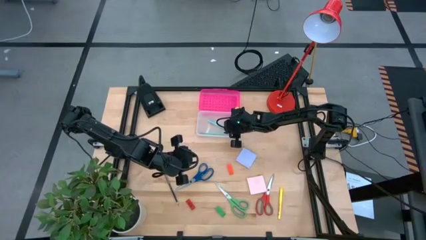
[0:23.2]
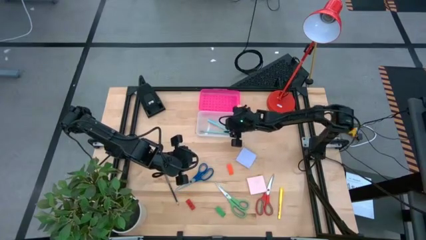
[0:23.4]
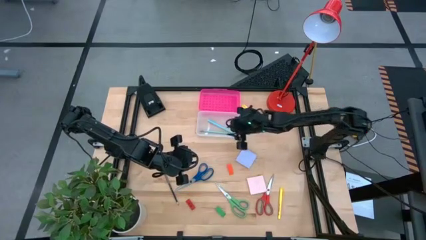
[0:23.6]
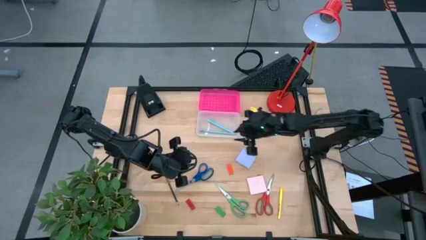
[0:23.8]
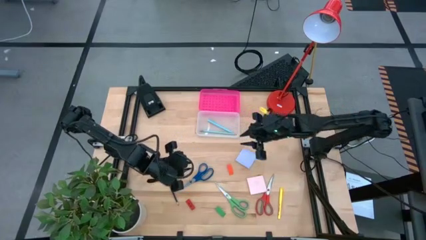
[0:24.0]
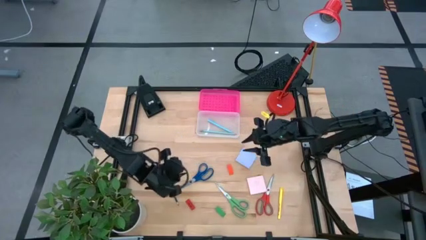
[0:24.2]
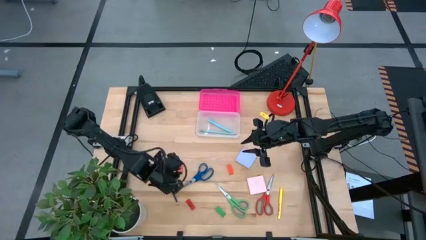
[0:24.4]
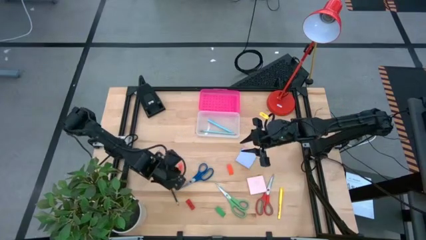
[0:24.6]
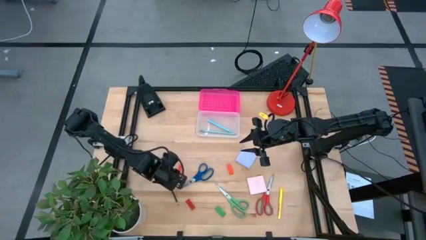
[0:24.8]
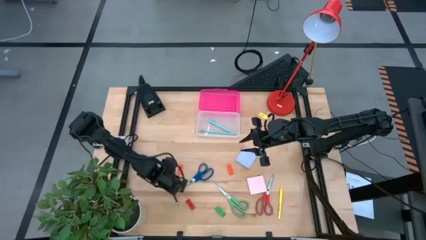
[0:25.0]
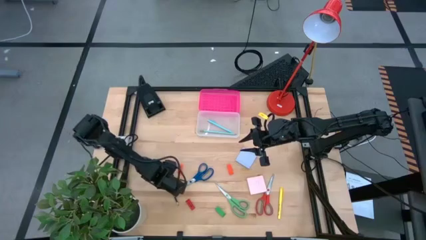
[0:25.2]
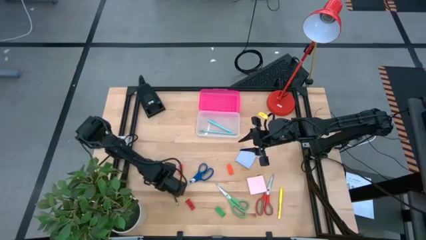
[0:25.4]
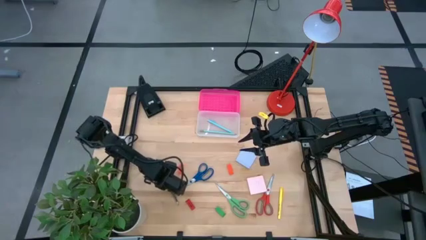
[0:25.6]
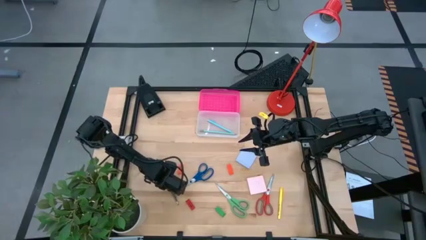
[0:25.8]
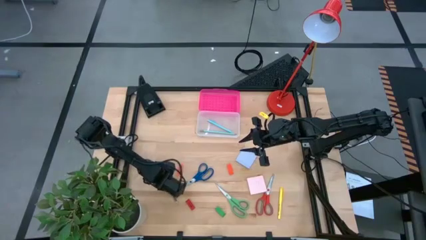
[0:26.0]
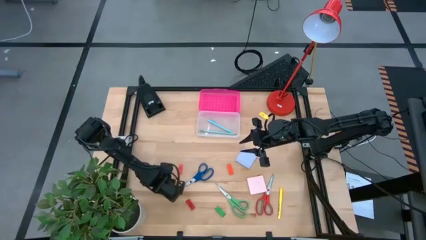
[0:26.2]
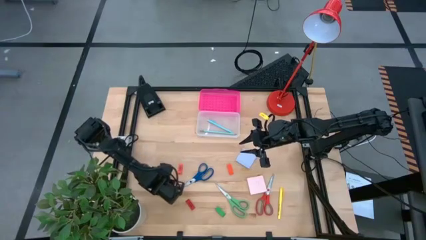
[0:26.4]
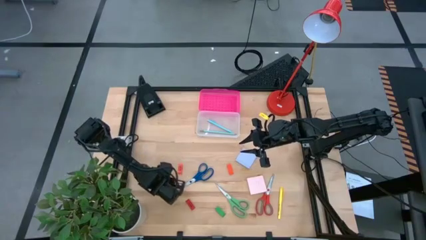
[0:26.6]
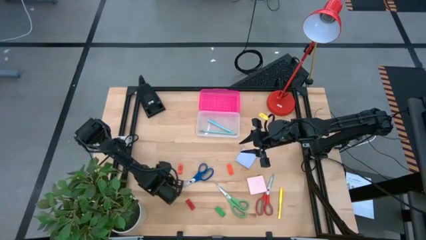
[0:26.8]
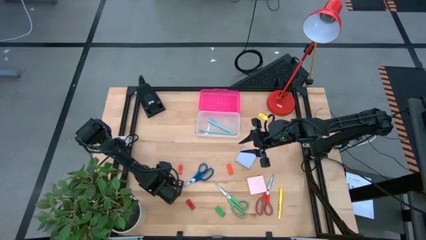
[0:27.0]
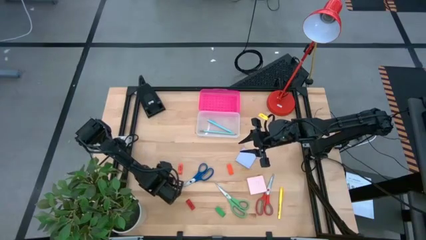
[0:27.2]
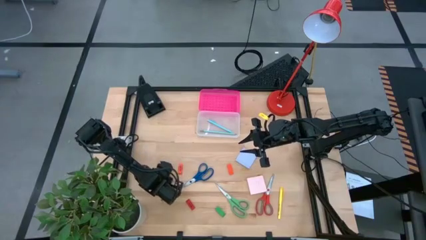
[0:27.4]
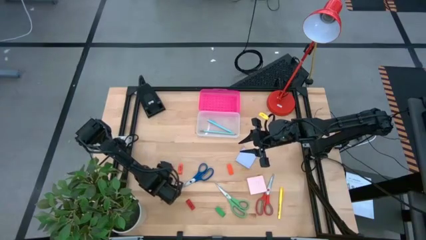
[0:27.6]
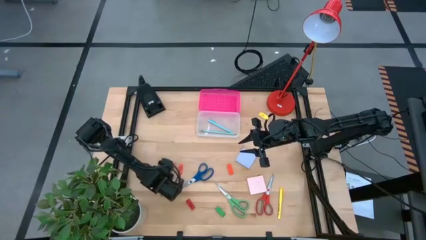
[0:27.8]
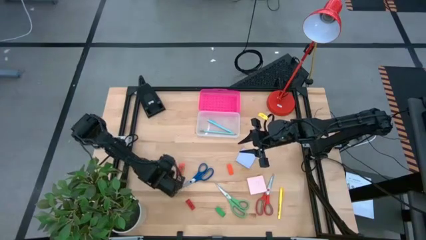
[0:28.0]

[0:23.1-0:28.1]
Task: Pack school essentials
Put the black pencil into the supply box

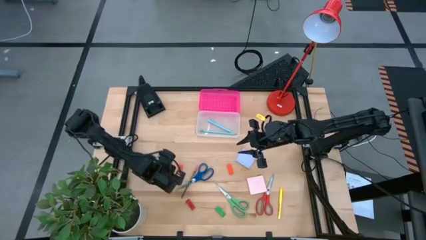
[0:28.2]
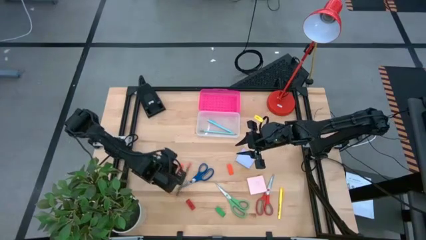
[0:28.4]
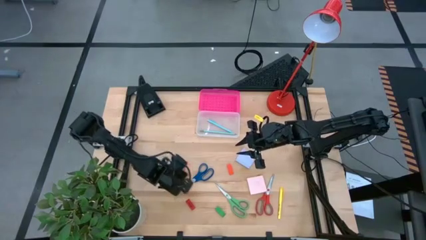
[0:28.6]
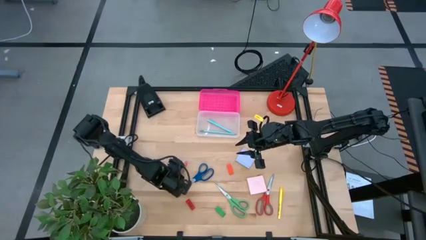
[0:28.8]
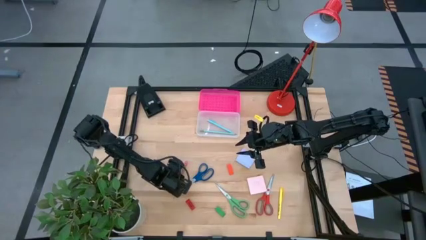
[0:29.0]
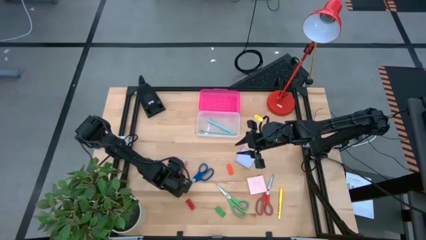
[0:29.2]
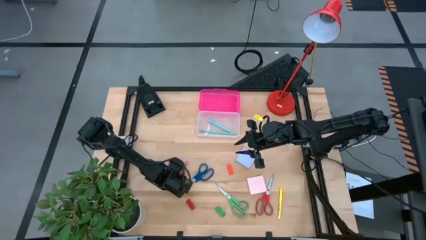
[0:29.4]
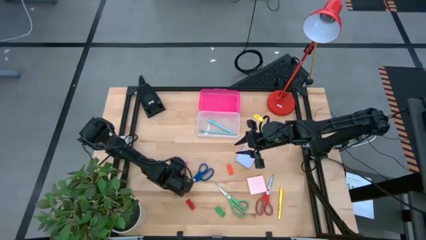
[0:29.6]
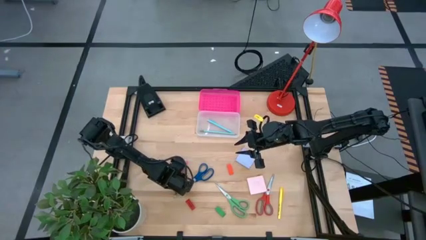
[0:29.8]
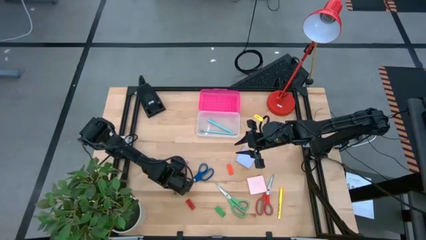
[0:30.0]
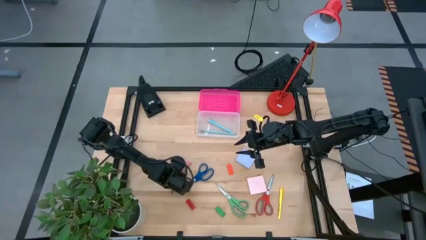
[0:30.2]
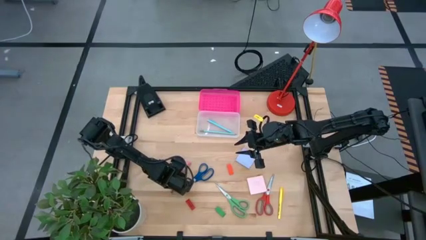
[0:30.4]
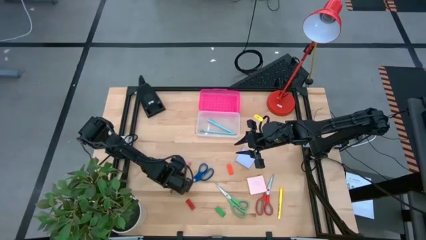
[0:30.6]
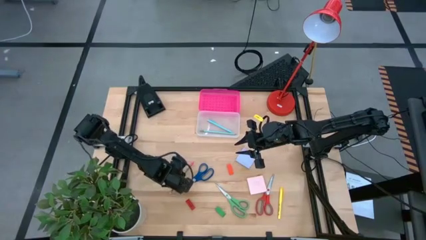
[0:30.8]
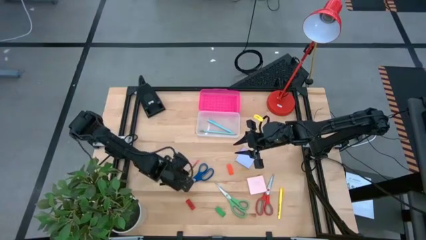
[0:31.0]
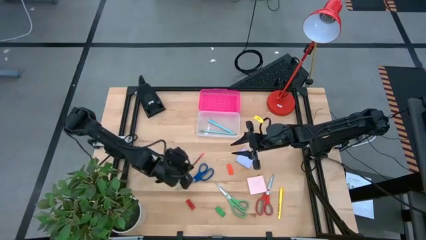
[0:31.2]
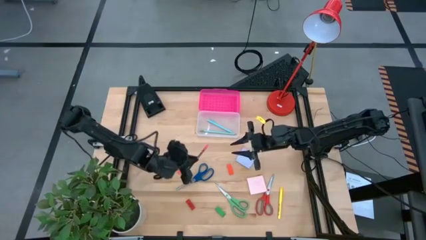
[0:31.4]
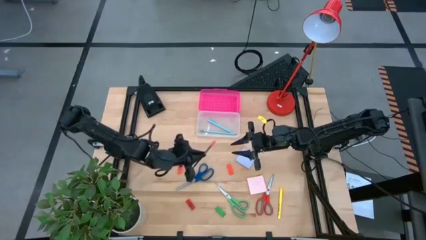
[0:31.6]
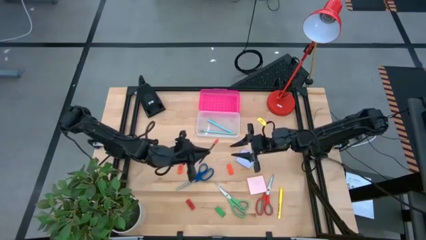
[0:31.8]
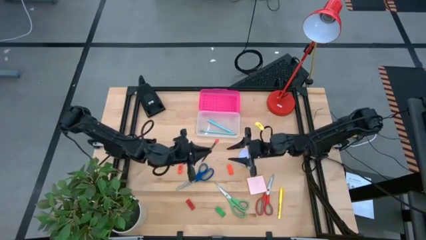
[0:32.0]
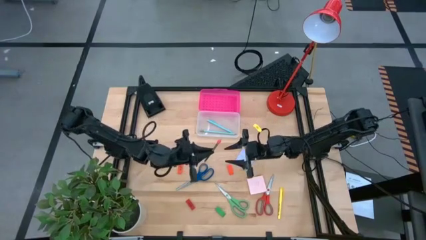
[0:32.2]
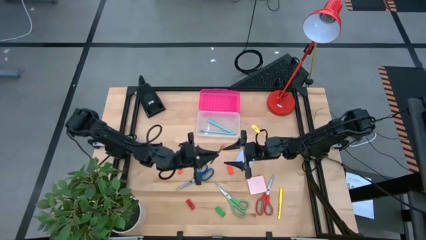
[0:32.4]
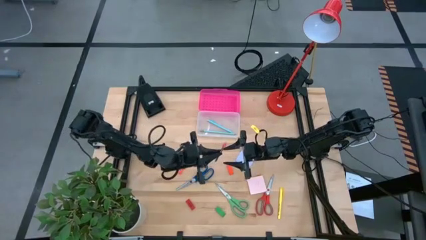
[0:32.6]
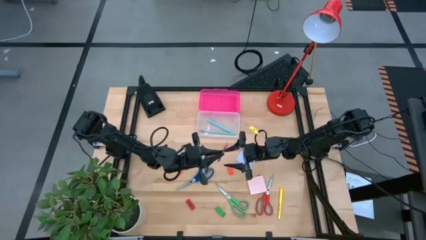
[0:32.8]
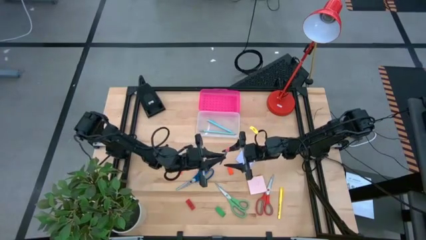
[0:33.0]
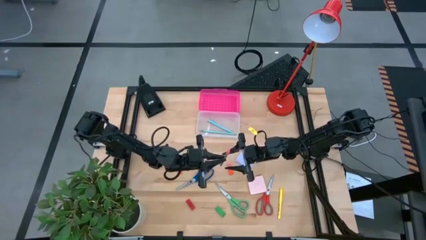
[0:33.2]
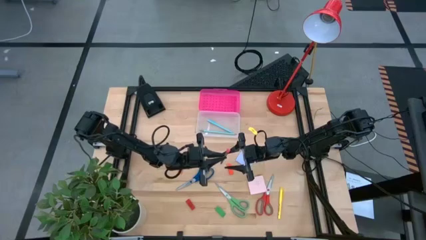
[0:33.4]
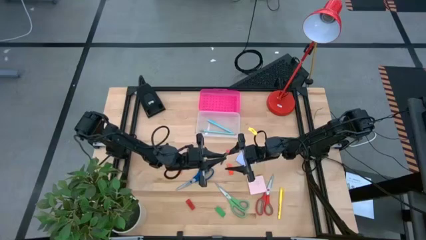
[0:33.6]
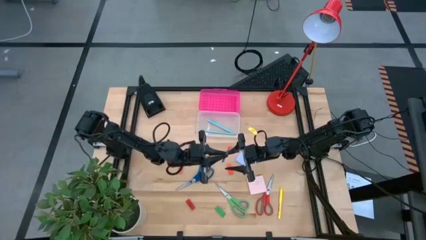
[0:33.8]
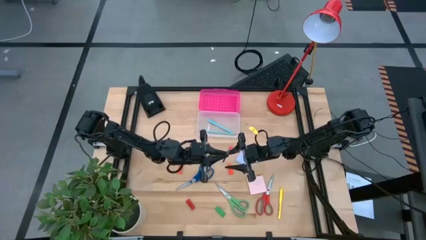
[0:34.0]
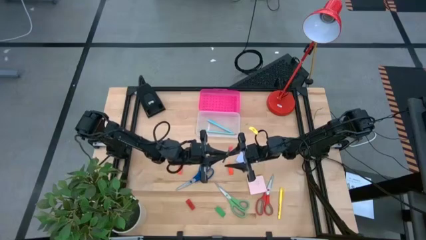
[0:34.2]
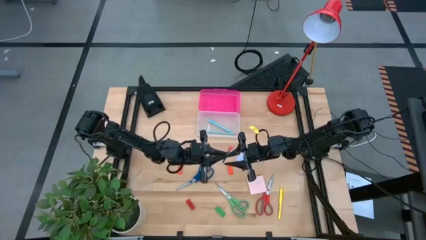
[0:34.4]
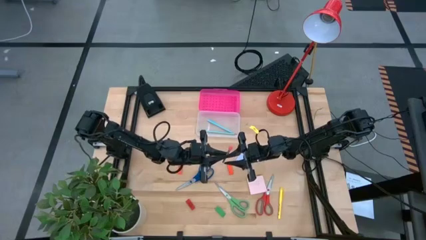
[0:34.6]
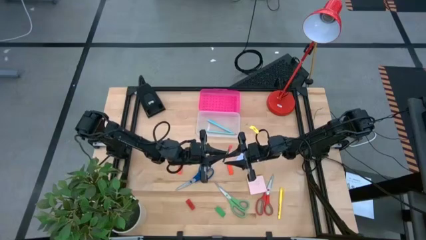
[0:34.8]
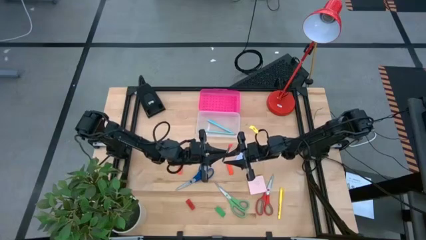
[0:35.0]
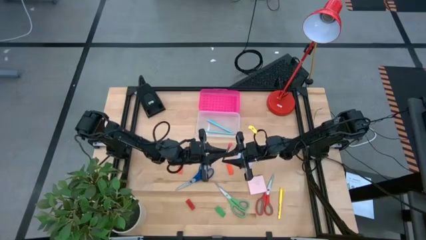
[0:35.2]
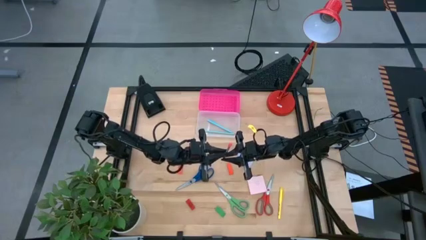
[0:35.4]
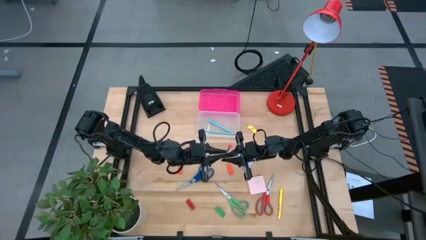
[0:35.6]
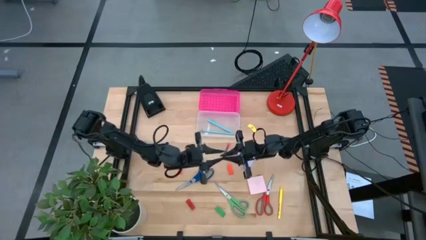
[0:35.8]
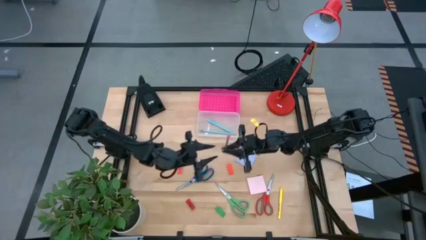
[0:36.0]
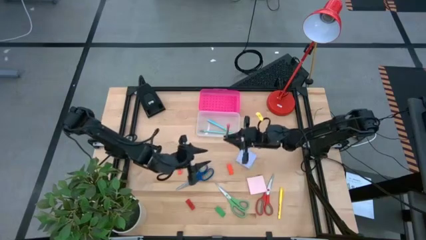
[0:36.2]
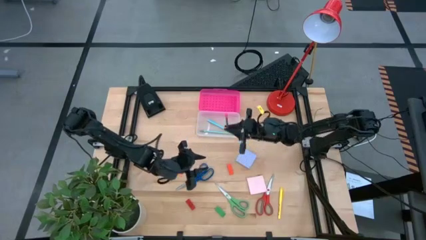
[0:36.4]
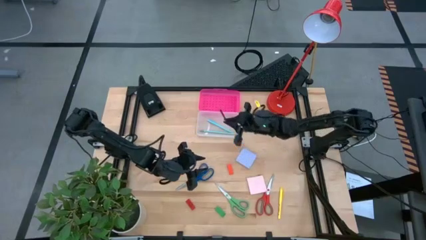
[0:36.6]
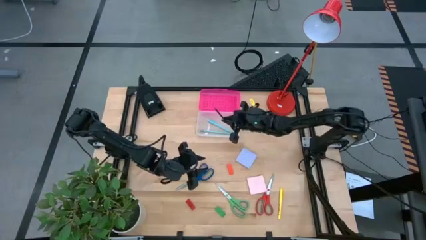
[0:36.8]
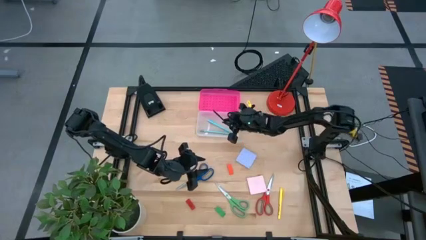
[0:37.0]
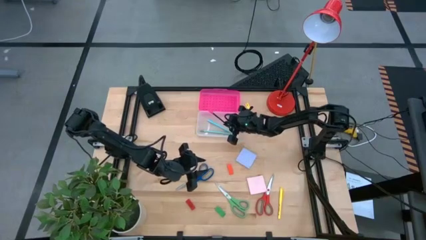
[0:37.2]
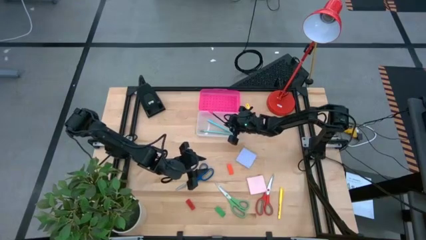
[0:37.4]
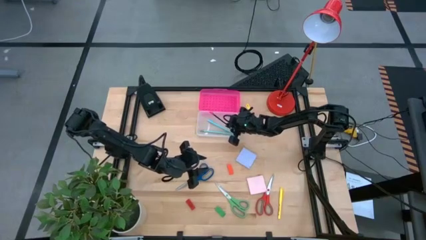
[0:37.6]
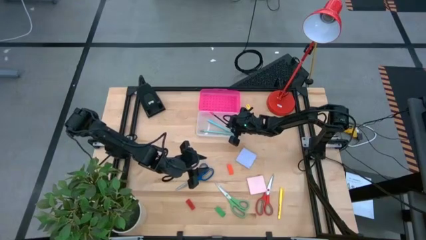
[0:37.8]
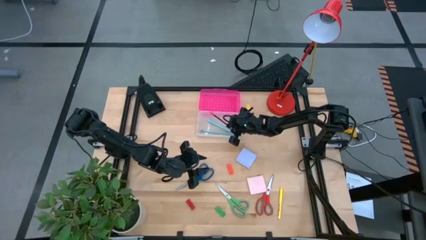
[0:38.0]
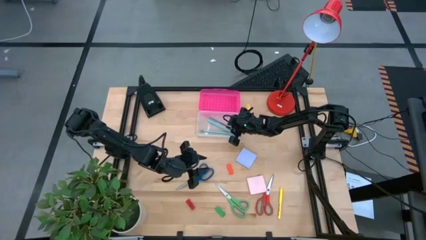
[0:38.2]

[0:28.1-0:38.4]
Put the black pencil into the supply box

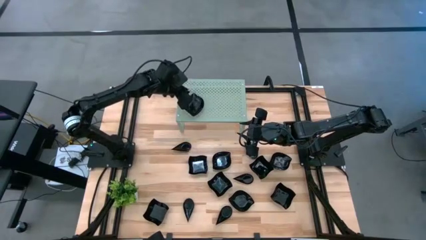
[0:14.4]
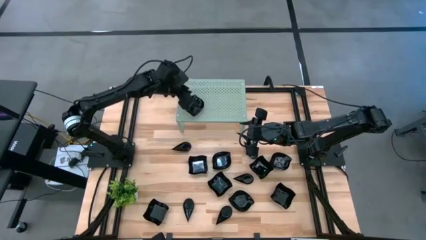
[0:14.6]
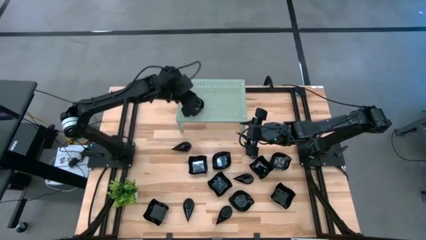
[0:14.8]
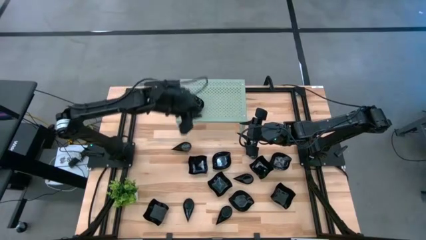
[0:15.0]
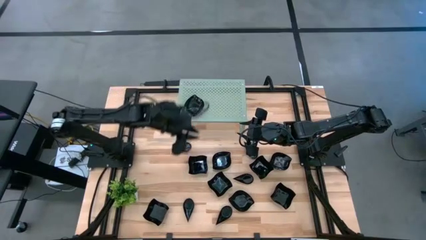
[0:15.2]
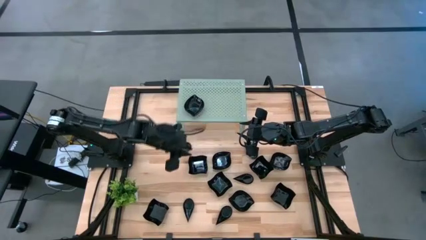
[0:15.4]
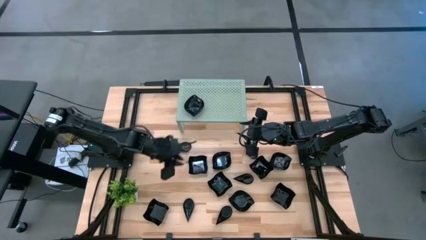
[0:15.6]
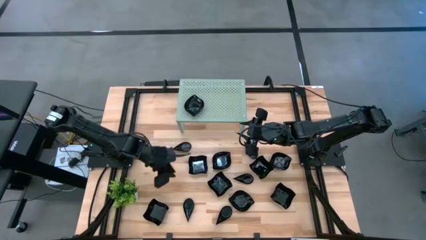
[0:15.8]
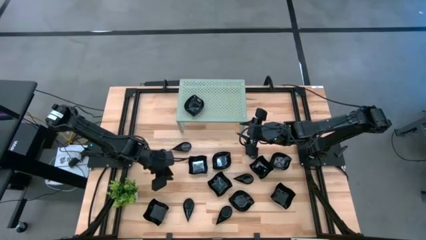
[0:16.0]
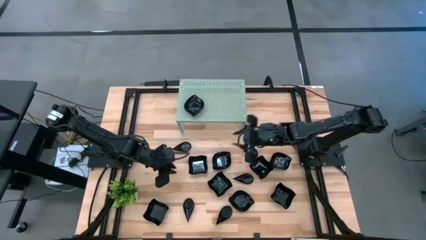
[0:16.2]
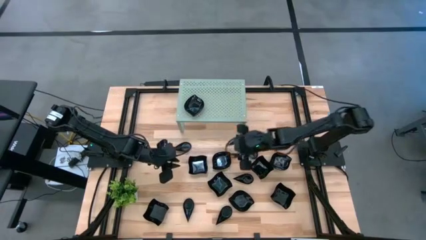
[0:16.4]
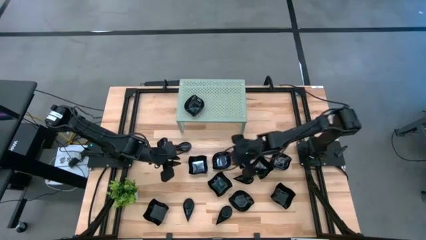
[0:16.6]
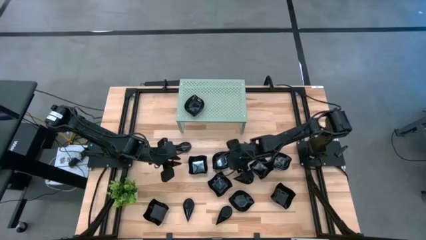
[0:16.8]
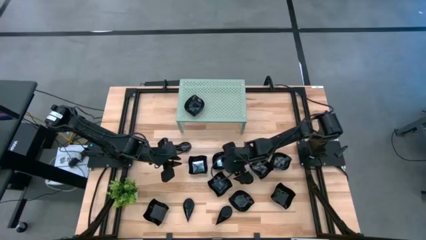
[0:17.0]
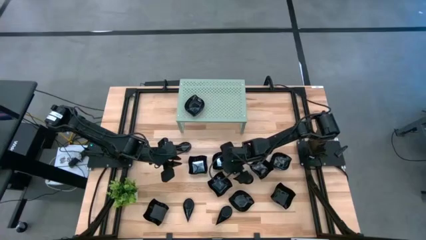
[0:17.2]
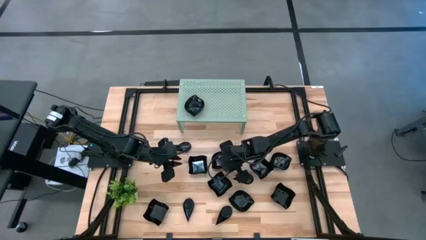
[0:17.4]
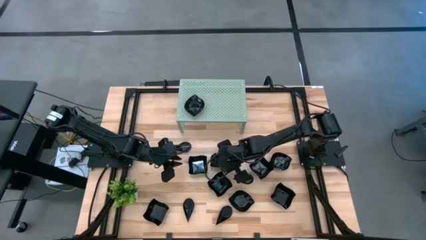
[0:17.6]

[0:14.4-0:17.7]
Task: Pick & Place Mini shaped plates
Stack the leaf-shaped plate on top of the other leaf-shaped plate on the shelf
